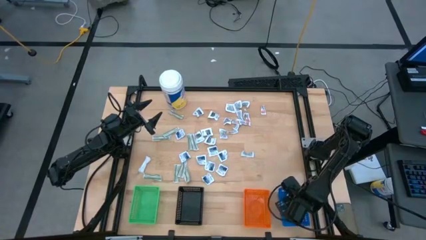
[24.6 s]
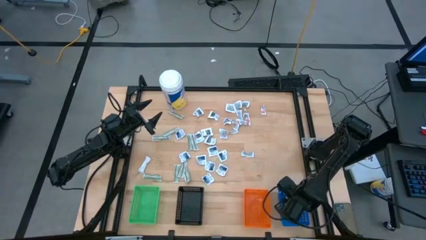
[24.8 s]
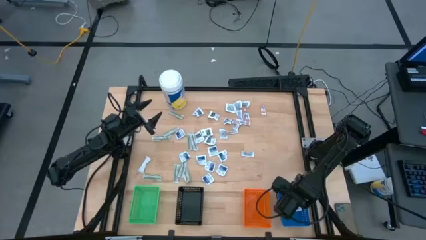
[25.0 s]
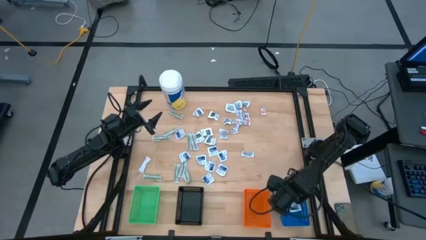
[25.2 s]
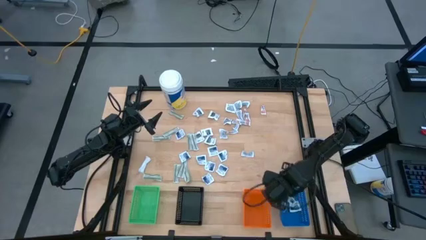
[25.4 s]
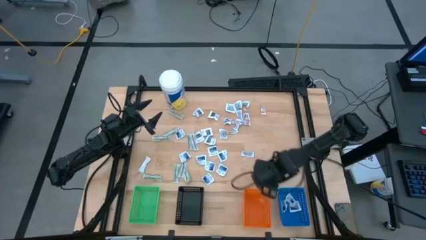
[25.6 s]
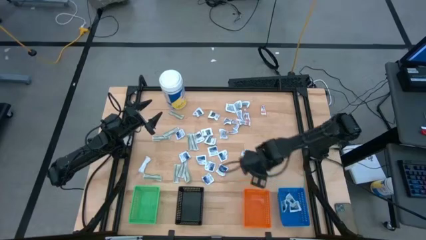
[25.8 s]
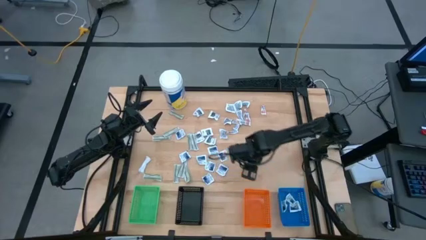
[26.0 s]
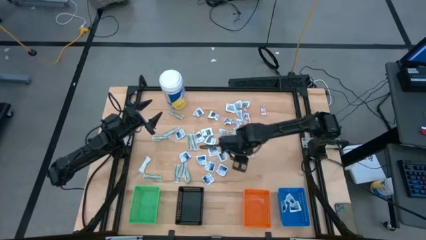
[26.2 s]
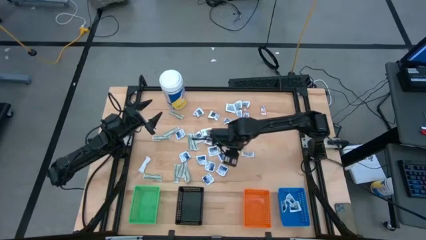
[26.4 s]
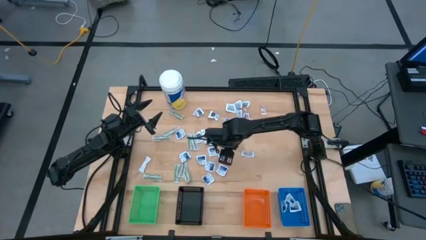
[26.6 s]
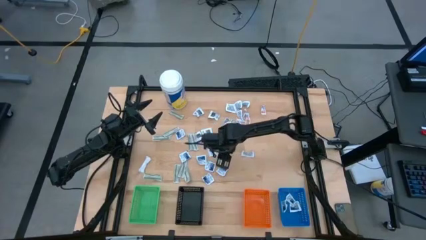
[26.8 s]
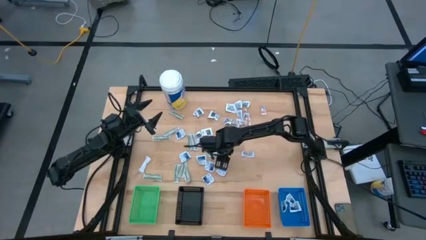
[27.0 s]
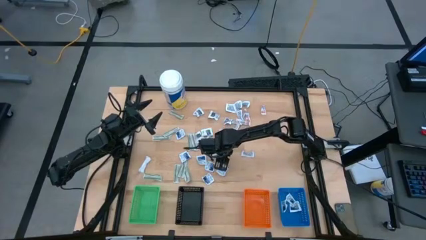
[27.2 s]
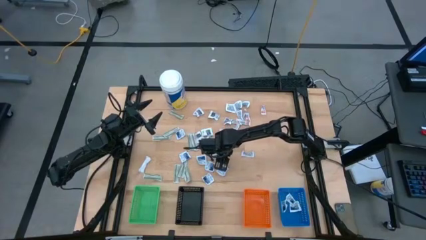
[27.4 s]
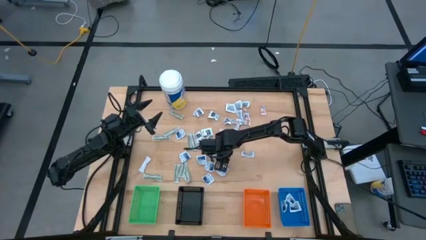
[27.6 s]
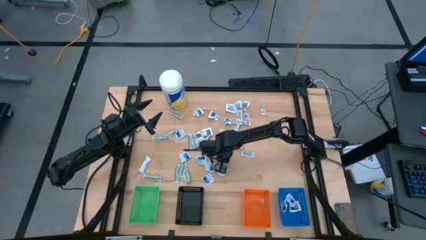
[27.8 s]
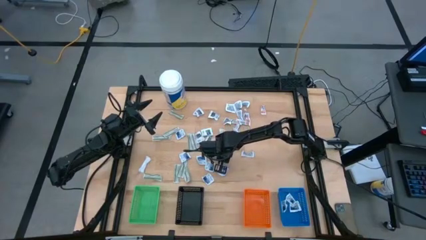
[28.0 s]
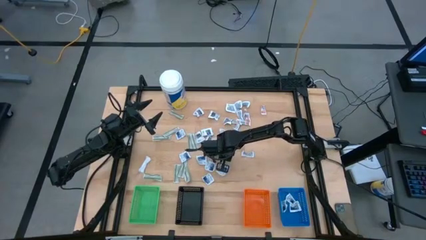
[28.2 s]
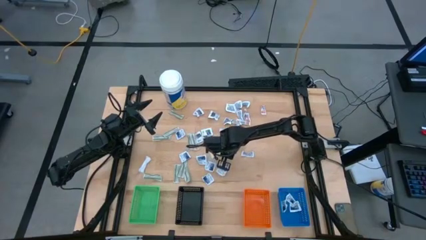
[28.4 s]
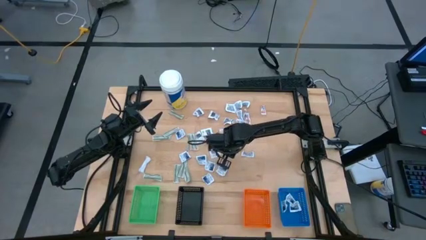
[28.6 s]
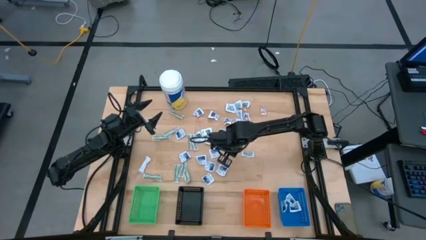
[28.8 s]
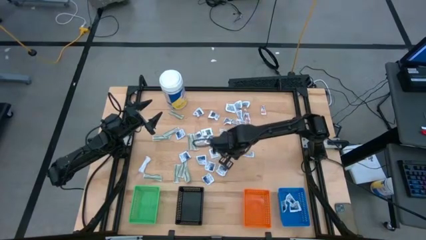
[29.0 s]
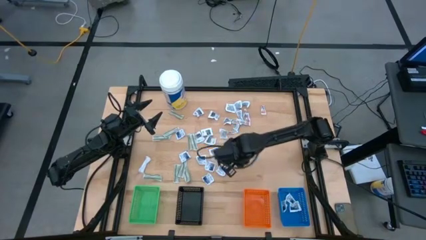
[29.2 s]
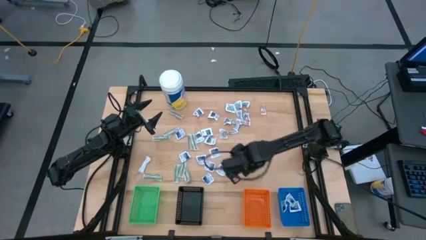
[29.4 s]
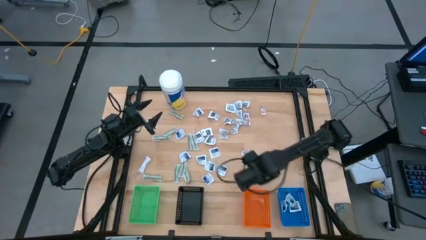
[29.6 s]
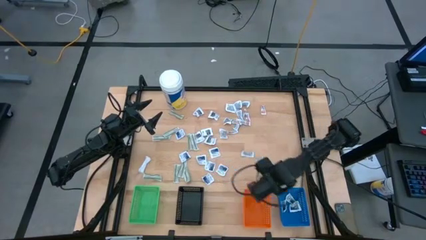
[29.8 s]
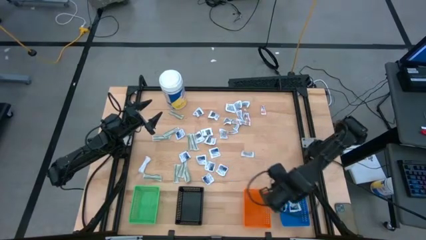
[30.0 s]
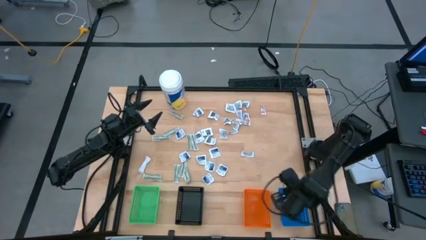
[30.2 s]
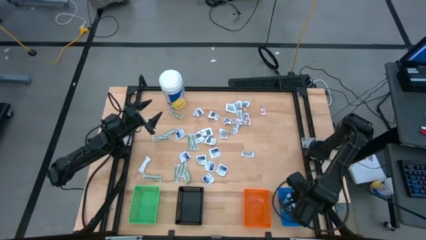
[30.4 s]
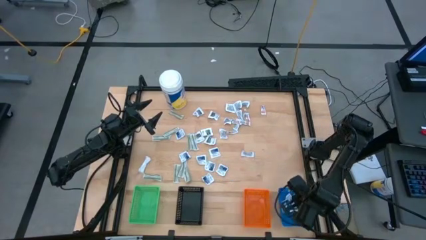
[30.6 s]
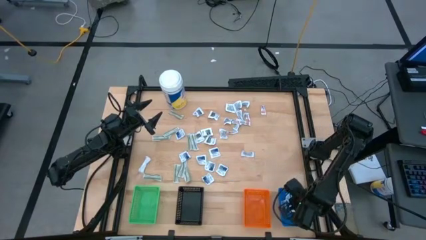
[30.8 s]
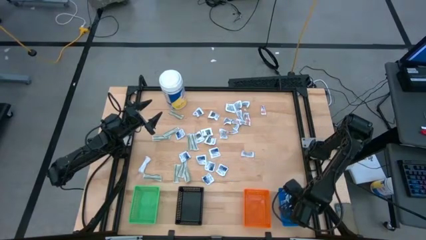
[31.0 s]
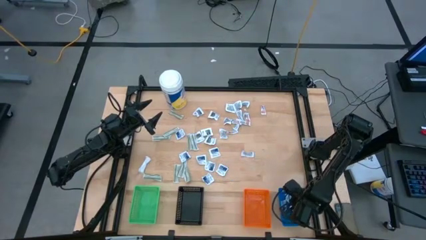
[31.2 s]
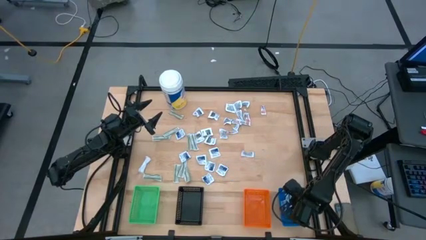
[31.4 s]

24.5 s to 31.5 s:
Task: Pick & Place First Aid Supplies
Put the alcohol pad into the blue bin

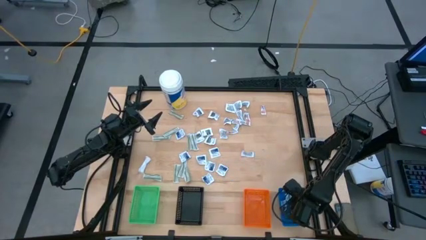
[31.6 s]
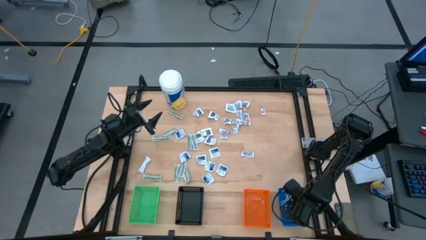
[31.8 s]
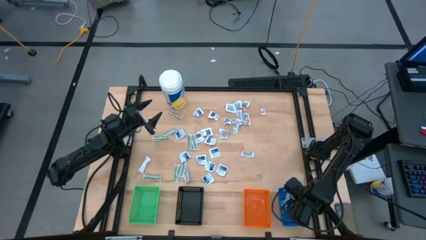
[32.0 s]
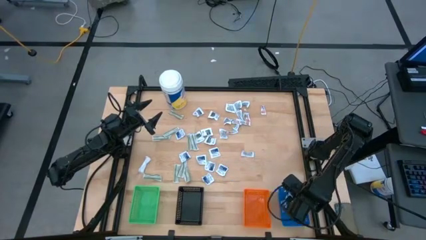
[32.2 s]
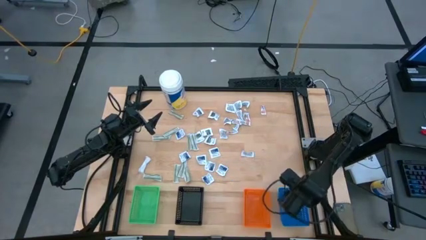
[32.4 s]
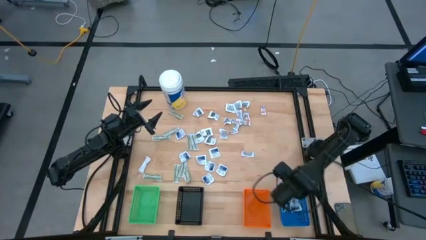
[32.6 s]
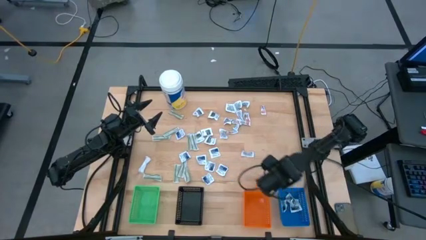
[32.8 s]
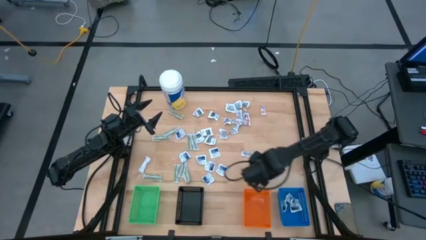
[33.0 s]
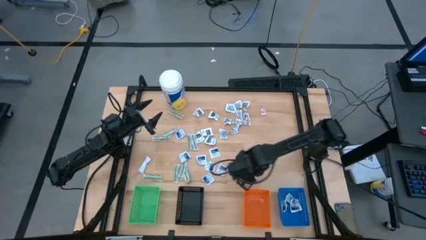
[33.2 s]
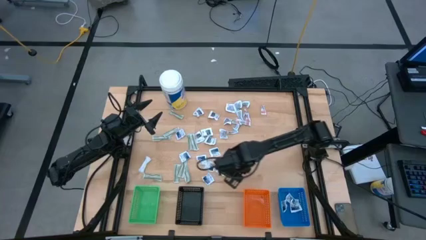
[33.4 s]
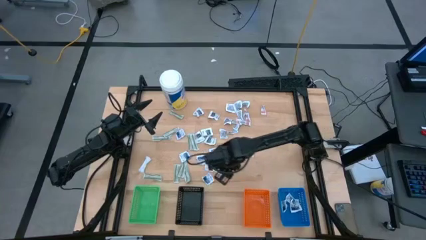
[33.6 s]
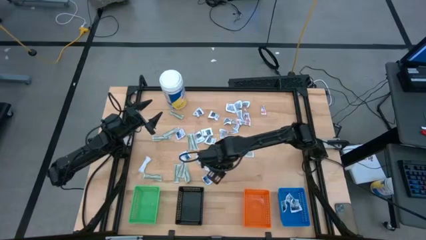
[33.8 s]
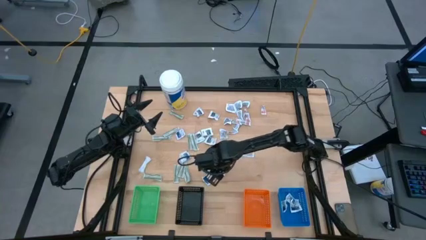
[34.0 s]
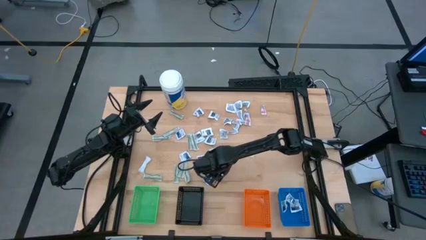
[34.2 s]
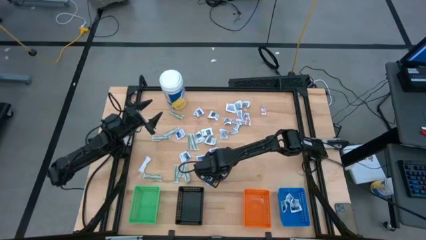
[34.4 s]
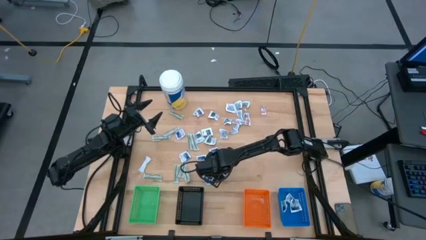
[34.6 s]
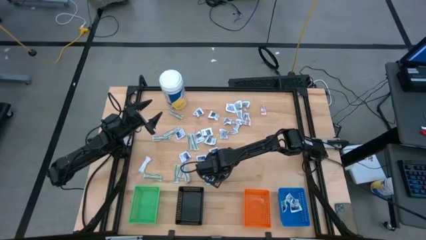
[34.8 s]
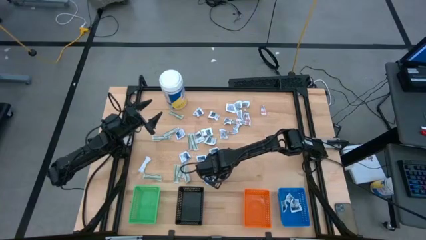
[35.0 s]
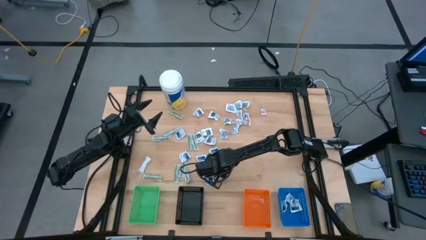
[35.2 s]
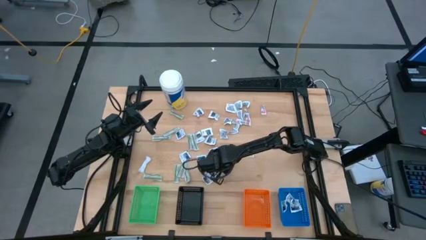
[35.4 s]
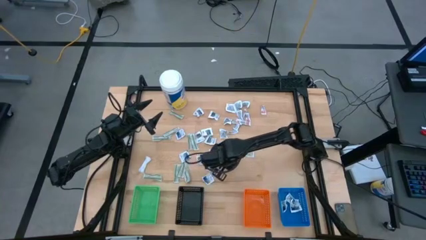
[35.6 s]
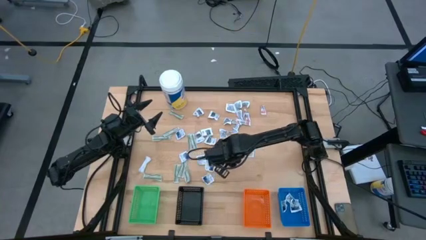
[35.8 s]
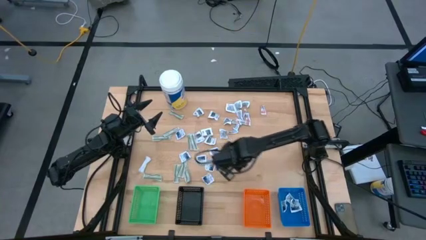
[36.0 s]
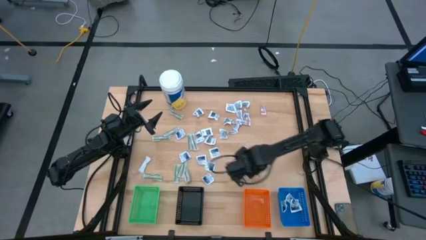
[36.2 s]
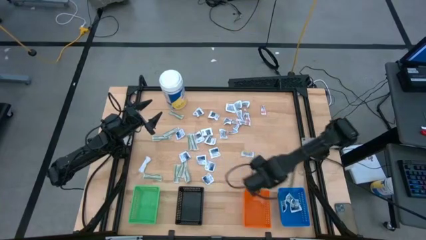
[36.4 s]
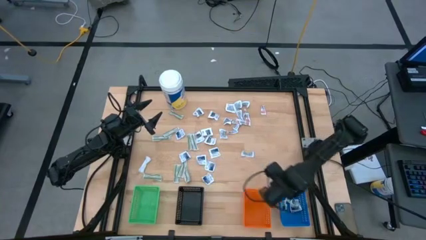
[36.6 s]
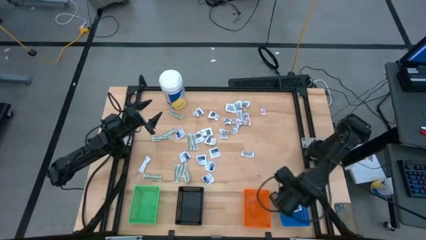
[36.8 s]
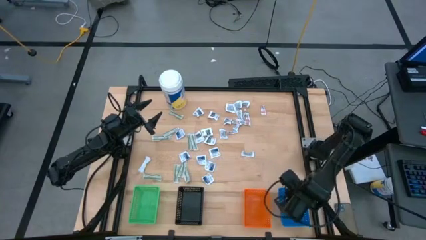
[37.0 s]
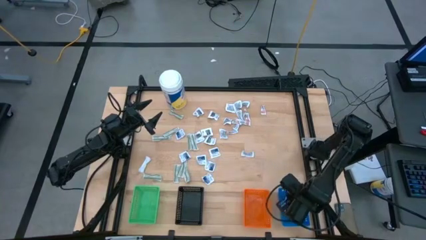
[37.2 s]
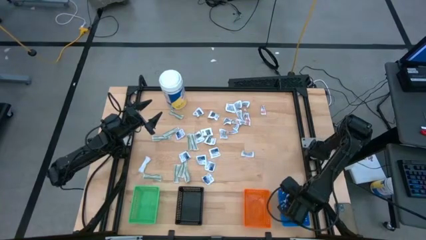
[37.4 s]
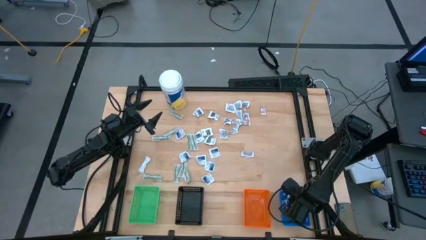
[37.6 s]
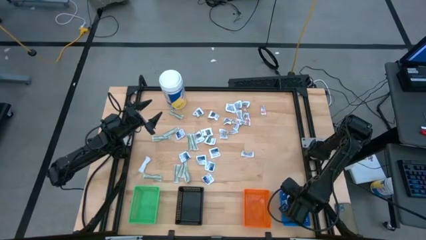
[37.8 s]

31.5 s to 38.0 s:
Put the alcohol pad into the blue bin

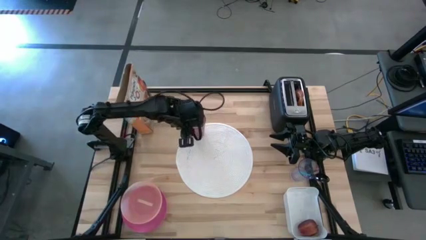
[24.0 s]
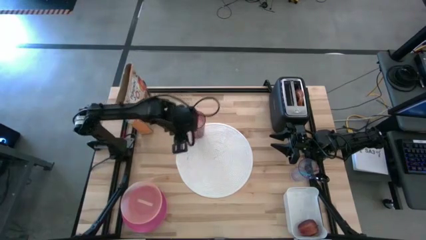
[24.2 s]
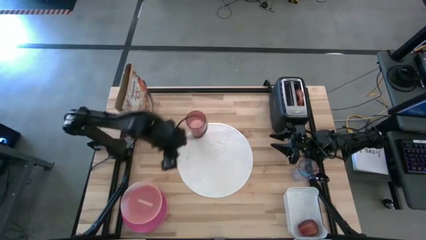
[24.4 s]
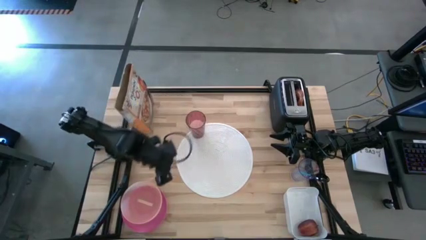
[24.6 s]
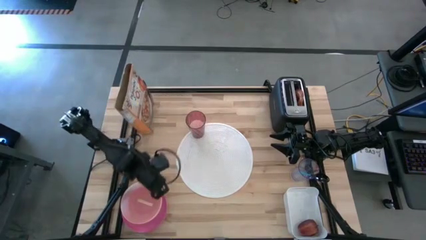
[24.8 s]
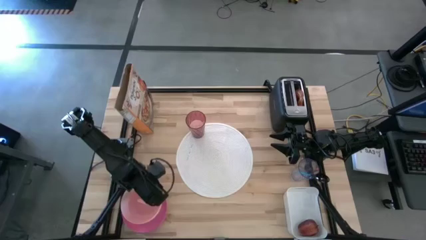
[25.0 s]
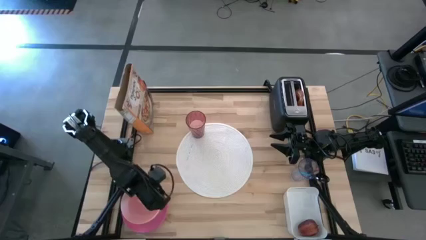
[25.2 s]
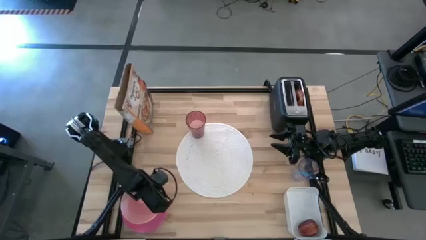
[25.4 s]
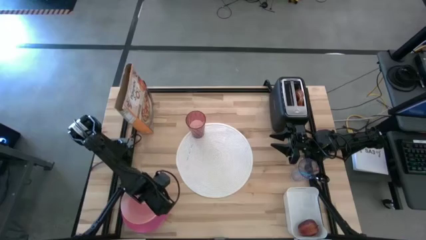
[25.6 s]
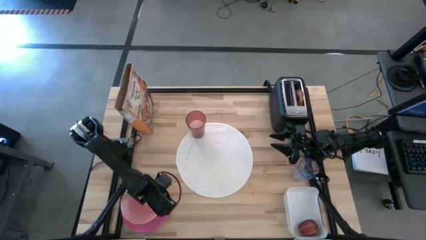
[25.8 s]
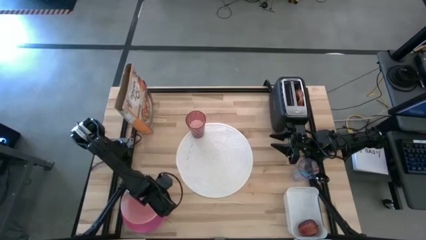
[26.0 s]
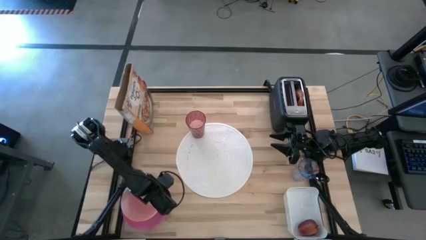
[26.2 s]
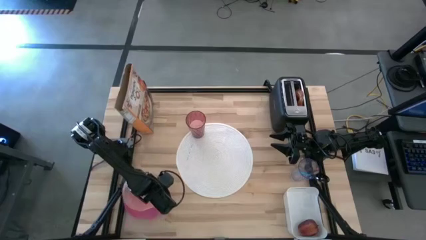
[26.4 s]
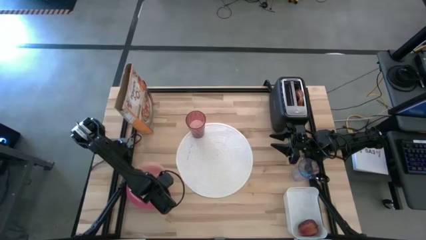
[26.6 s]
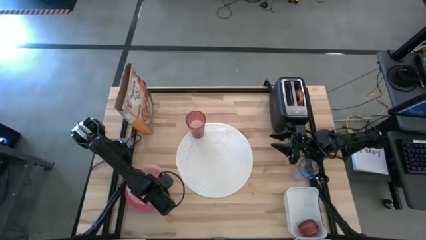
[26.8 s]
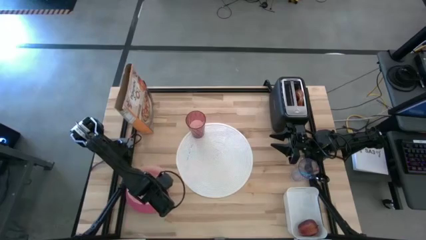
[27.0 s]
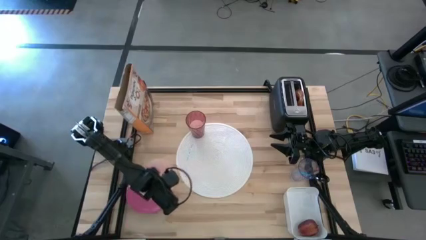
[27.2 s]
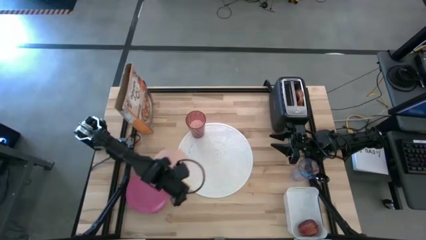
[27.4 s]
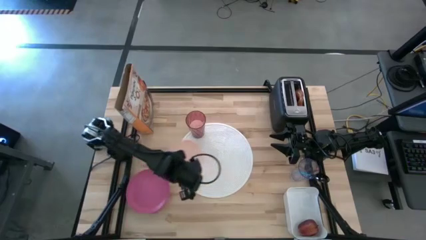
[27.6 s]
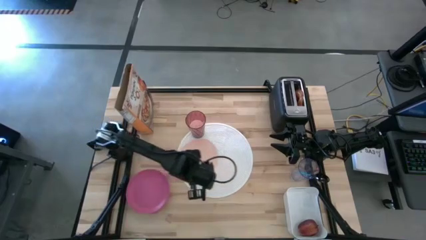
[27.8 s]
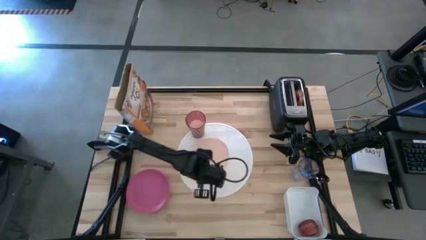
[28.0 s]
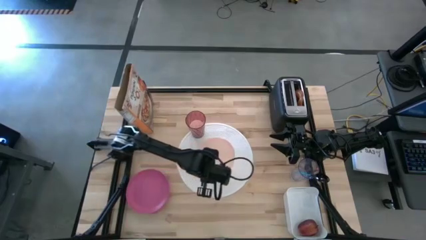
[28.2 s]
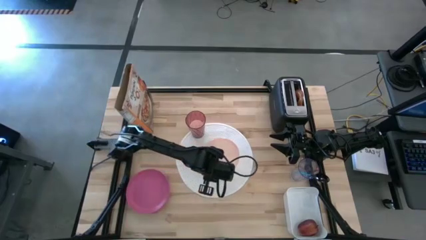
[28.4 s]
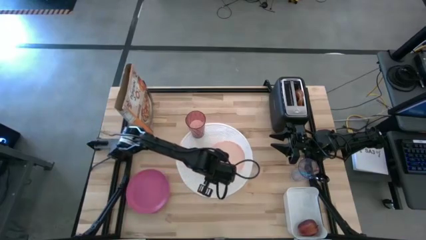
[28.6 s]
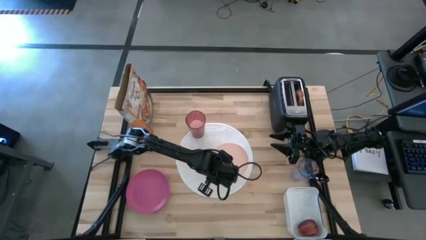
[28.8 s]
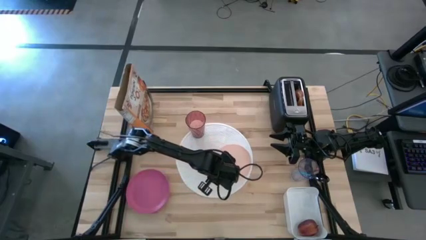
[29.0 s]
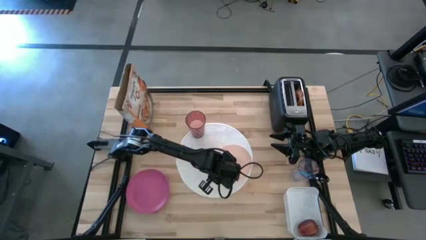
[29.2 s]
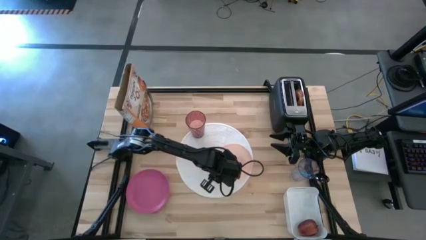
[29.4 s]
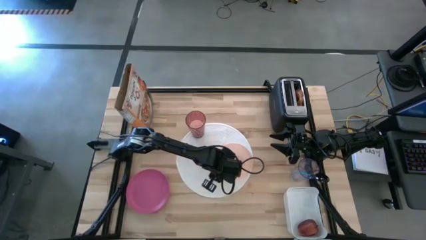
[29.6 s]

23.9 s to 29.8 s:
Task: Arrange a breakfast setting
Put the orange bowl on the right side of the white mat
